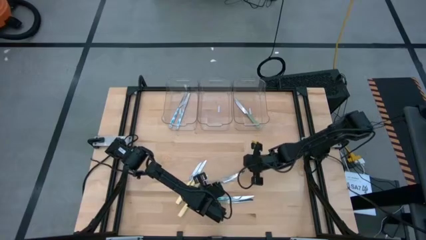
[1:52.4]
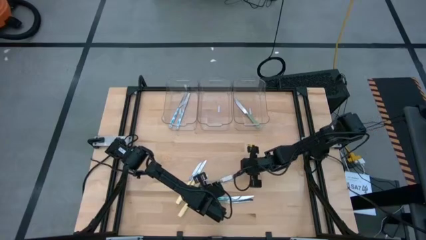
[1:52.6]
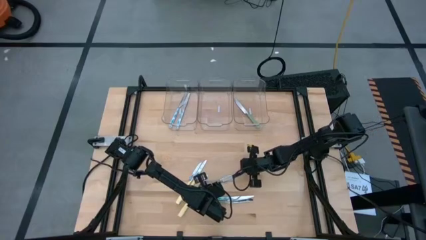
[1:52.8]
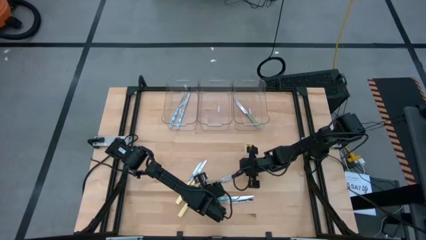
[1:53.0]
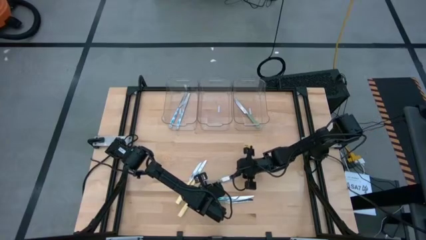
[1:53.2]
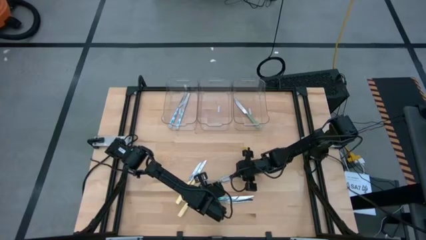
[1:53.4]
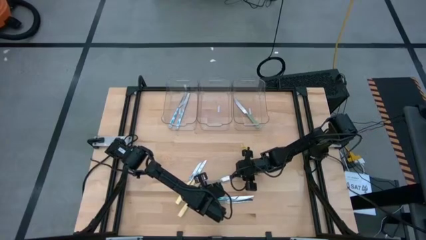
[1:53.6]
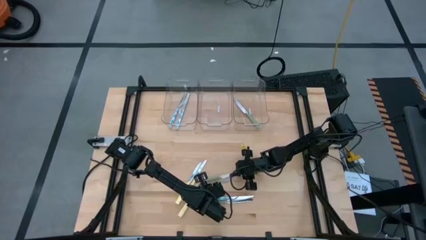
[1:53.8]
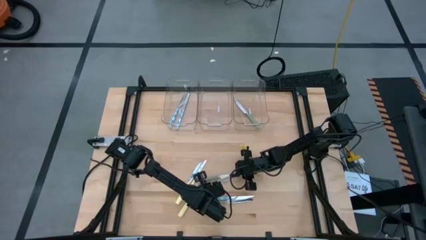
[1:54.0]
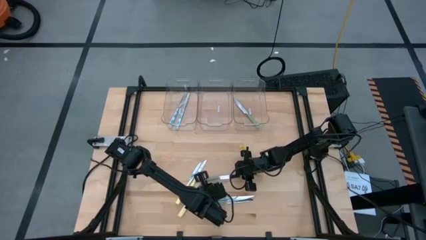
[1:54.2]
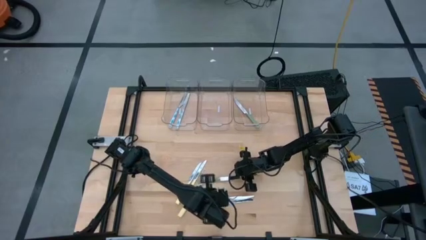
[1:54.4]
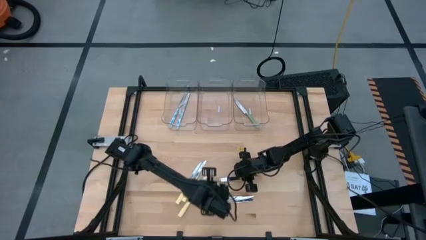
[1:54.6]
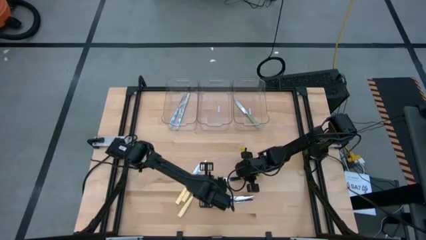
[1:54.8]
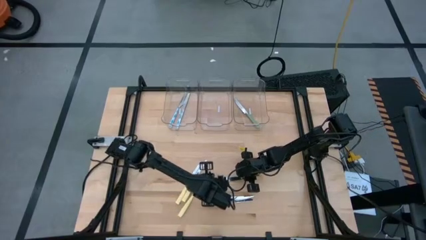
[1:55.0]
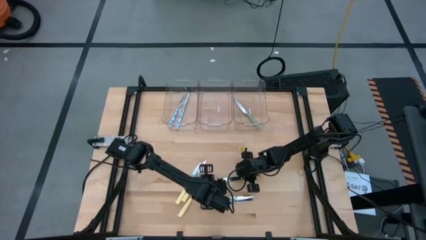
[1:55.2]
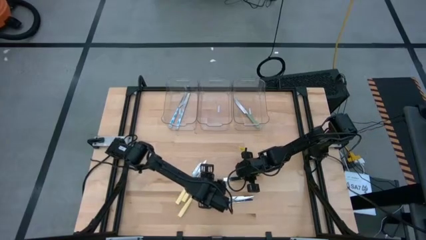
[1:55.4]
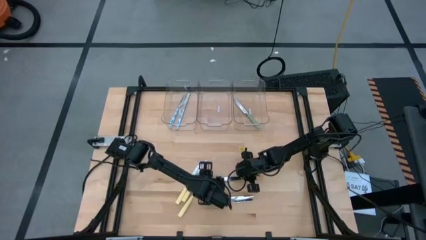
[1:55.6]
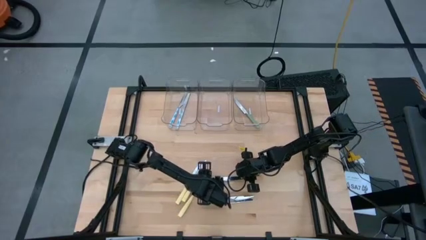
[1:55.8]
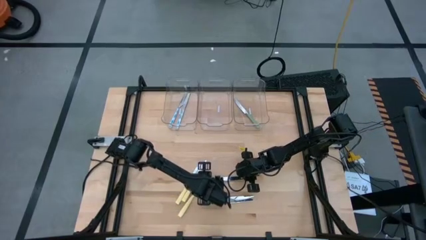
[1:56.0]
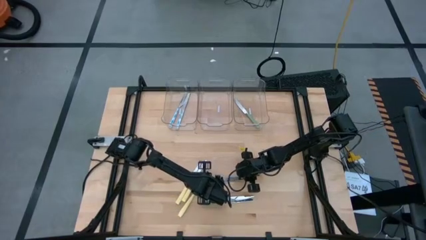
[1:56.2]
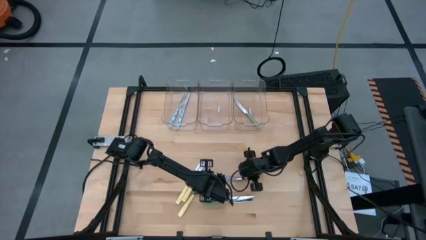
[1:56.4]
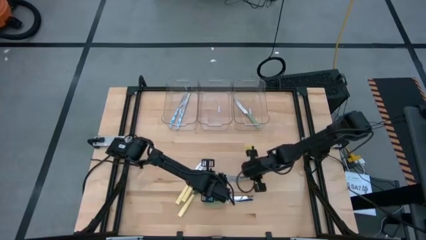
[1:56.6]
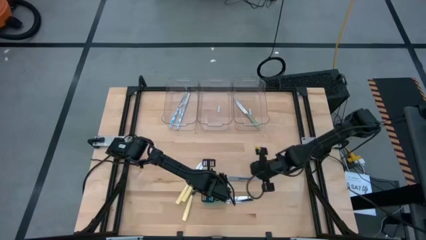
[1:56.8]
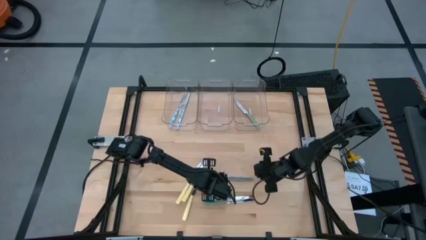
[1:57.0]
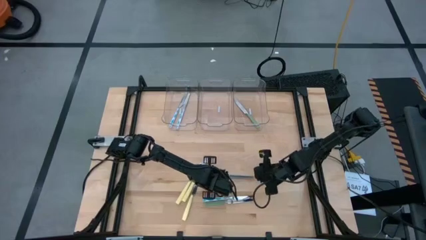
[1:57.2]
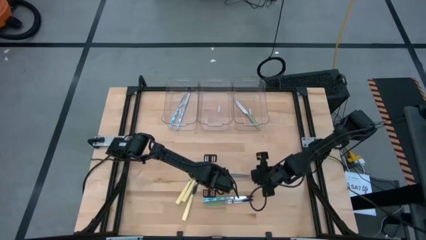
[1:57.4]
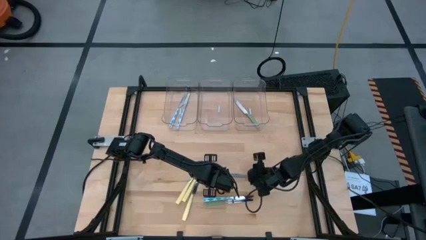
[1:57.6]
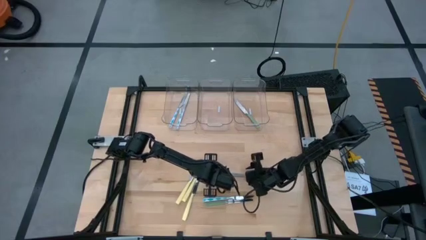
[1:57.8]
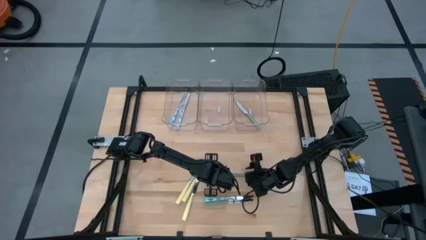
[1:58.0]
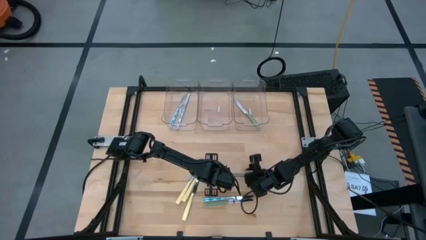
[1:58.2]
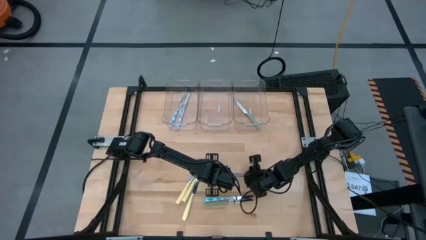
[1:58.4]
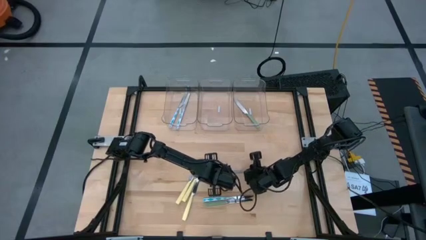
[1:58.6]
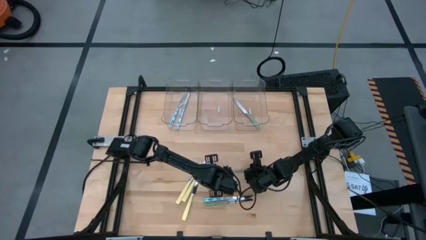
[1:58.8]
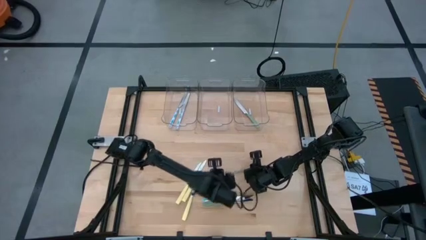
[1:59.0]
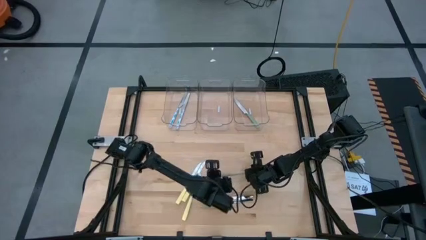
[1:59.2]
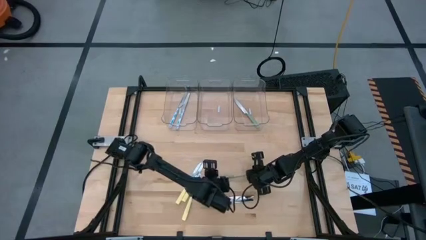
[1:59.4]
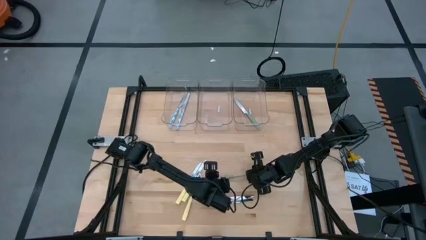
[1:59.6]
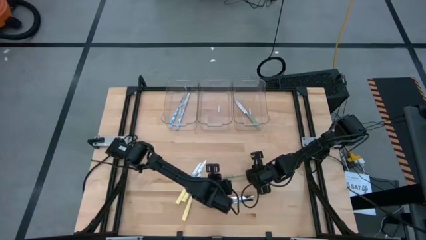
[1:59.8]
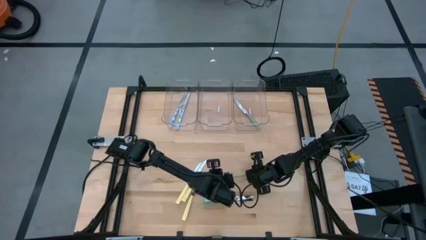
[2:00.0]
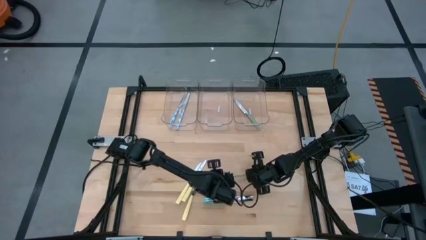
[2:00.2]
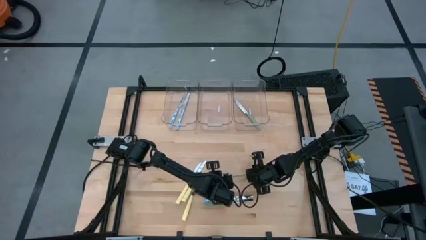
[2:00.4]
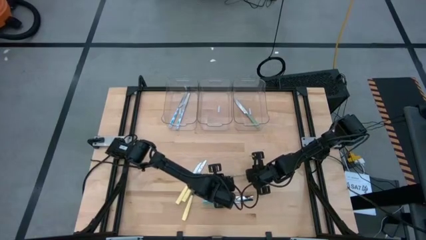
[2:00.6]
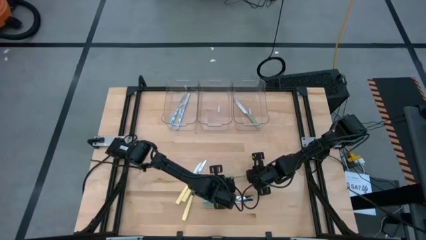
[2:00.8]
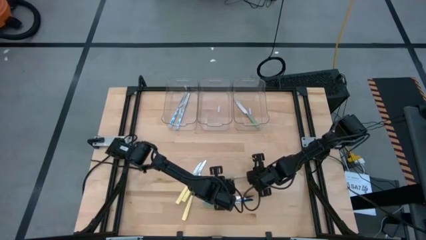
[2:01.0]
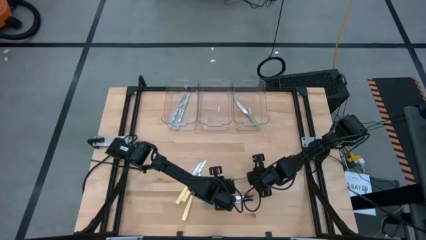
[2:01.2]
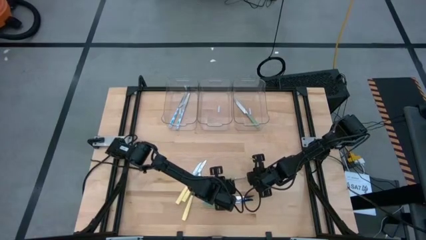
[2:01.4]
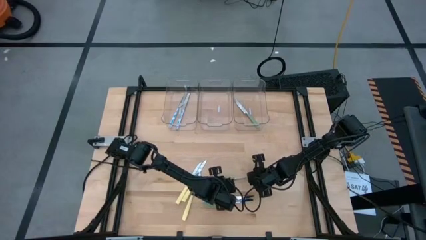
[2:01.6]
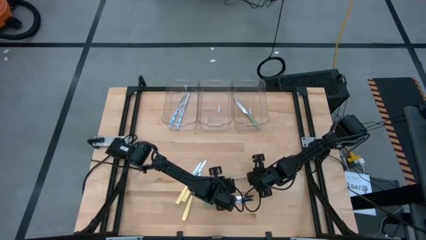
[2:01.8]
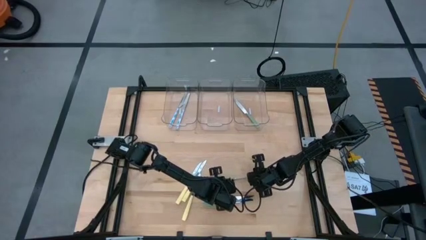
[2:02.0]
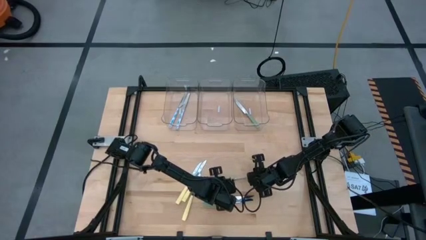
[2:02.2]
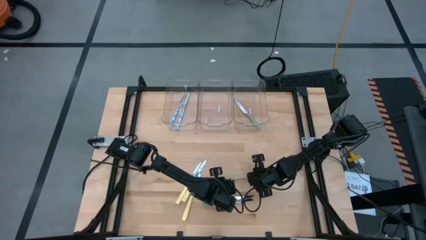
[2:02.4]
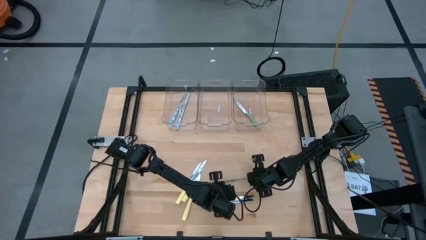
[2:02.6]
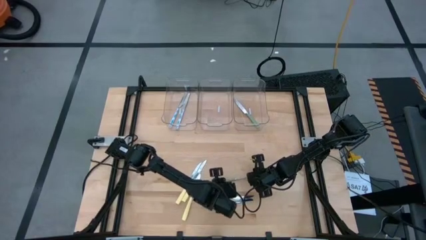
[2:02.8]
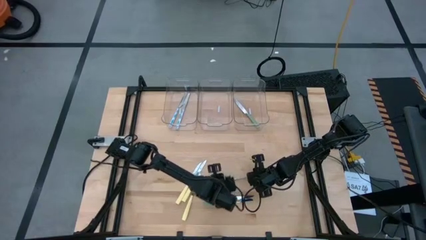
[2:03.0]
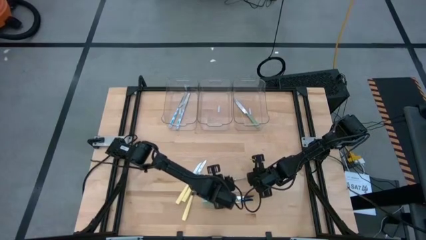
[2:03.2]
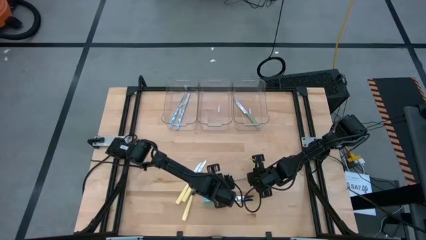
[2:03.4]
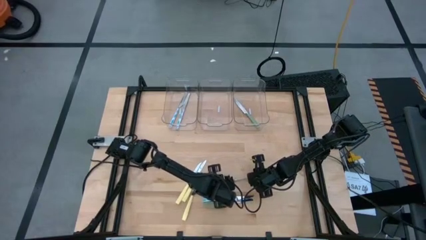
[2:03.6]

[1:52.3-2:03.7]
Task: Sort silverware by color (type)
Put the green knife into the right transparent bin

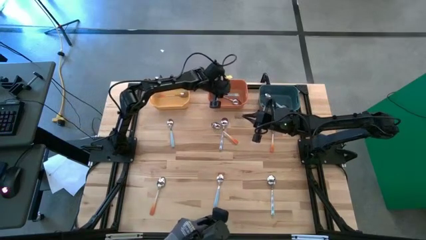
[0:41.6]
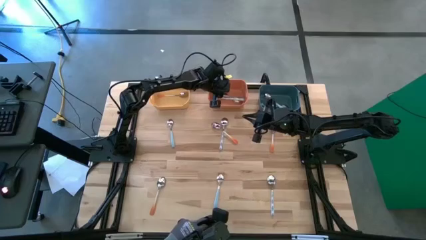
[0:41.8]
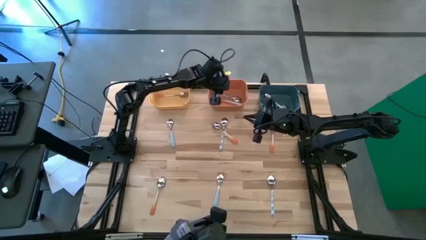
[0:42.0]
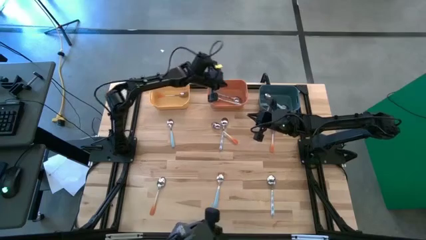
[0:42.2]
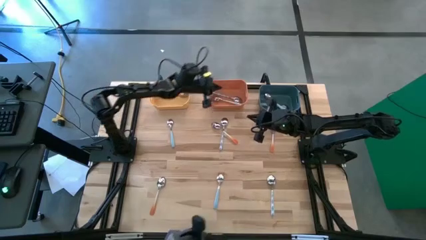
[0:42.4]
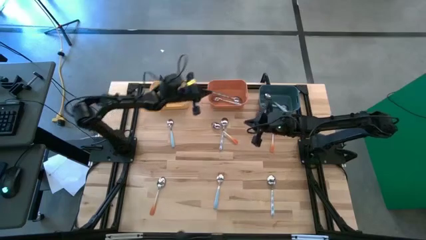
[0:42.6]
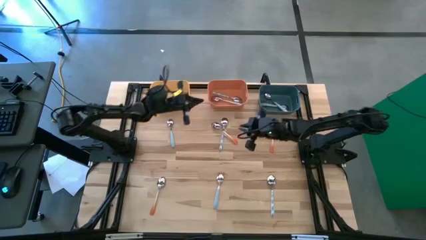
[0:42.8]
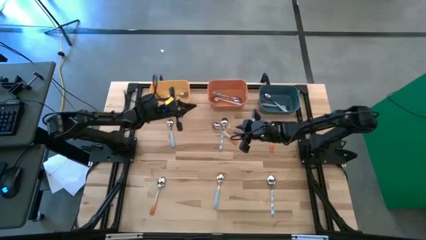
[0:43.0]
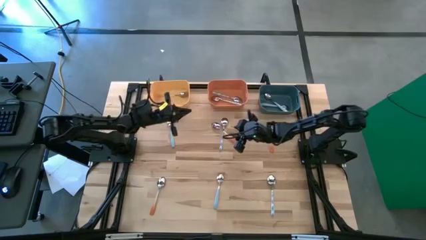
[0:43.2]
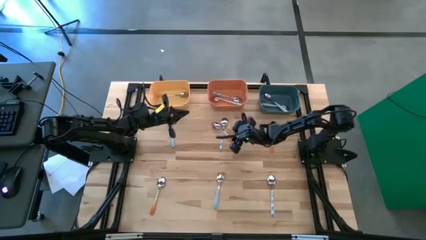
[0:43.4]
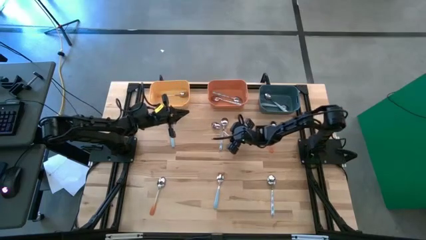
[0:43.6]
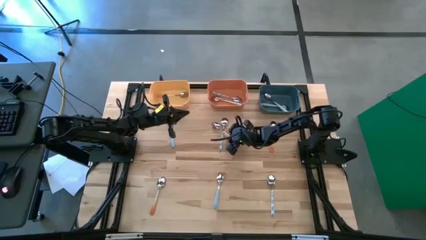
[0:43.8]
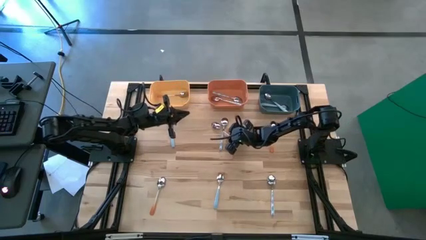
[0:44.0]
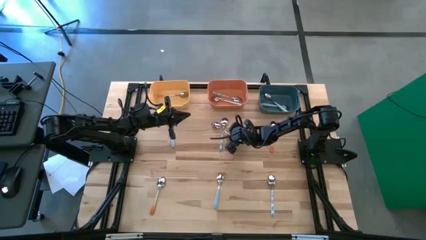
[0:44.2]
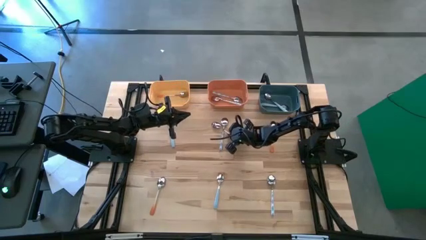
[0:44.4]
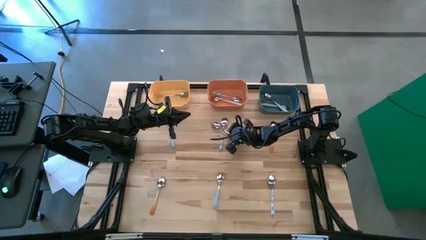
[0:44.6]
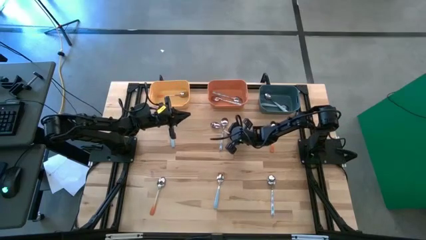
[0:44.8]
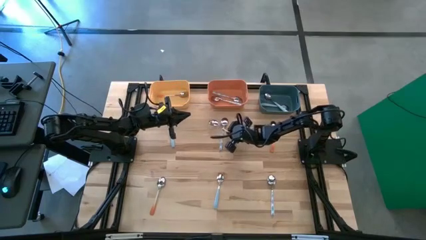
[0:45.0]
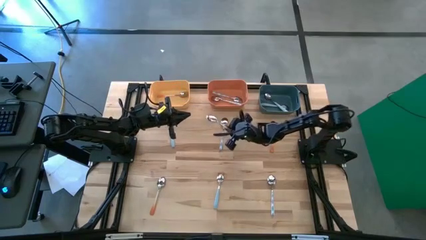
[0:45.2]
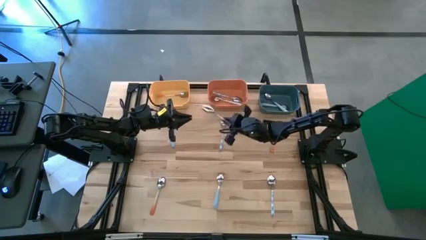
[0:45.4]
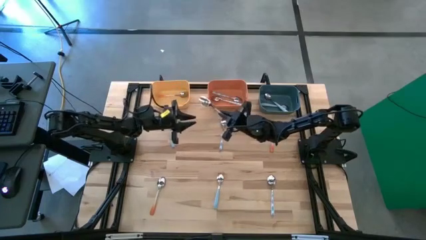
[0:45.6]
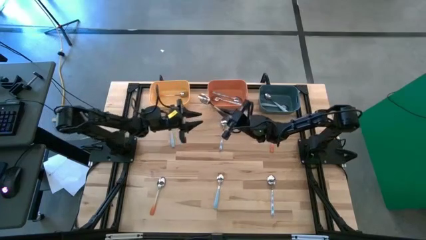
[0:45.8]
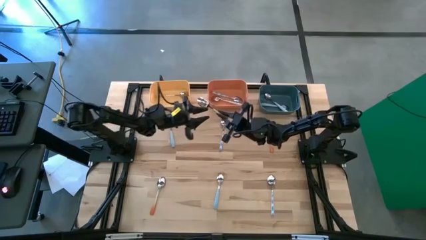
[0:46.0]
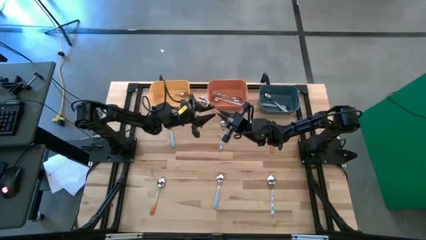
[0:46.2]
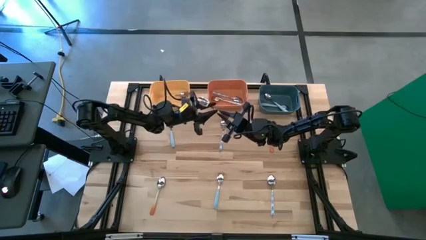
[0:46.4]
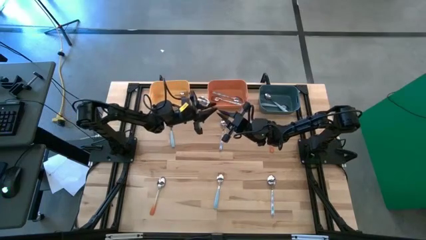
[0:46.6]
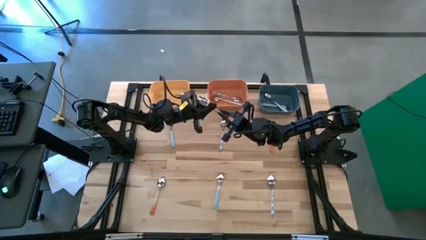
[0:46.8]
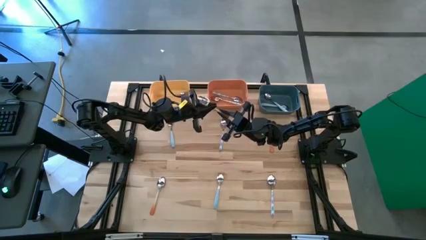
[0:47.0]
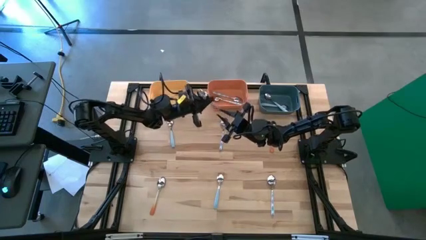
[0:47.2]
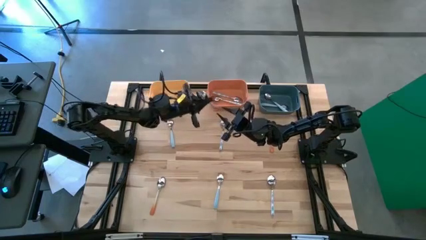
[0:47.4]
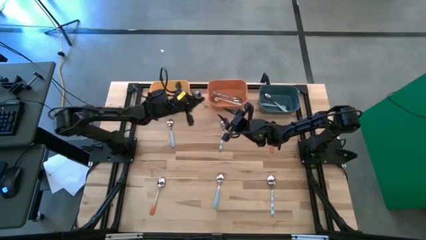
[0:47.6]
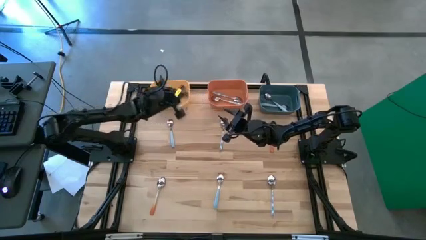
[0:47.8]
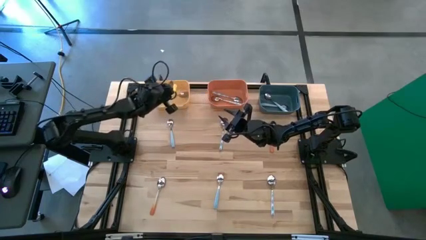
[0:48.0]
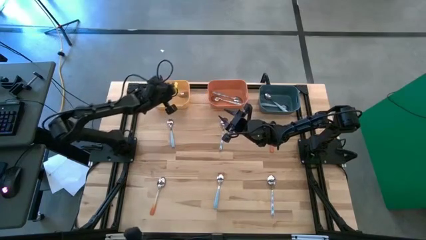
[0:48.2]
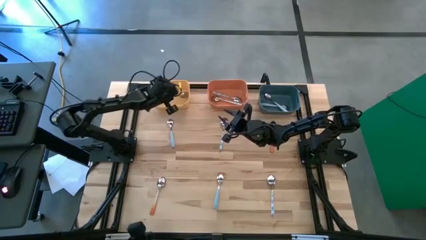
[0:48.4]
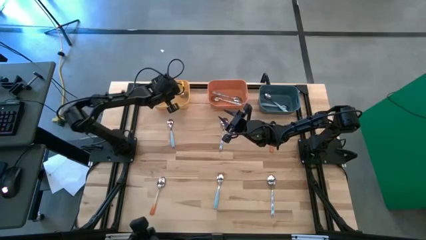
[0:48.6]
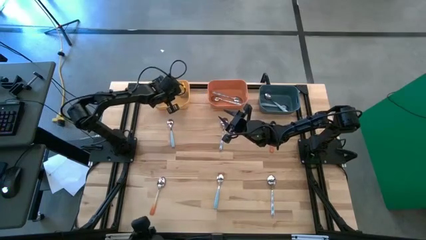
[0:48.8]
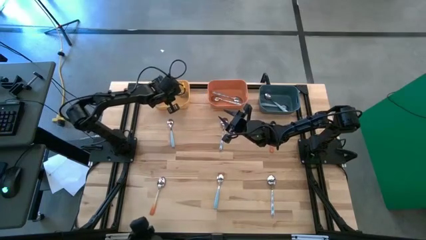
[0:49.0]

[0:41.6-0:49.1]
Task: Sort silverware by color (type)
Put the orange spoon into the yellow bin
